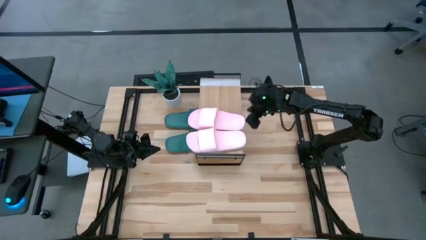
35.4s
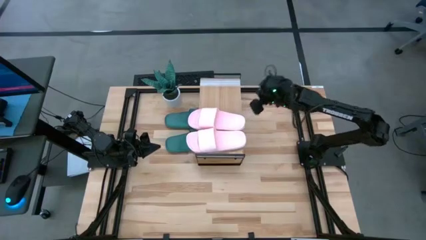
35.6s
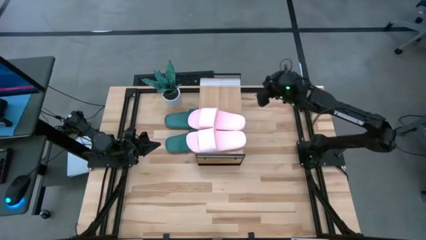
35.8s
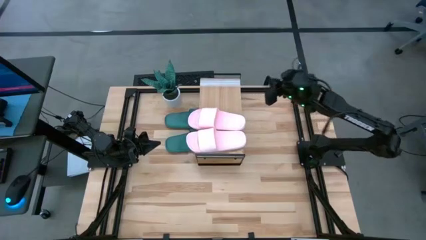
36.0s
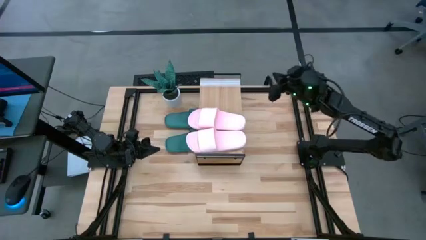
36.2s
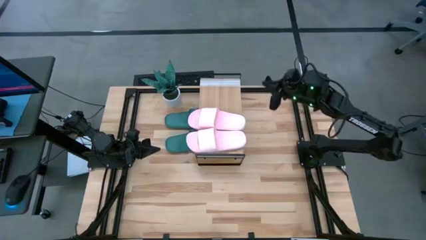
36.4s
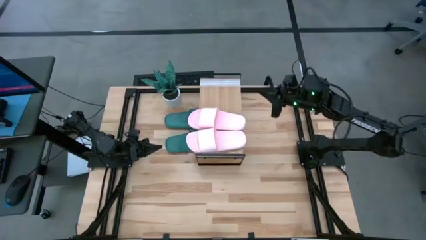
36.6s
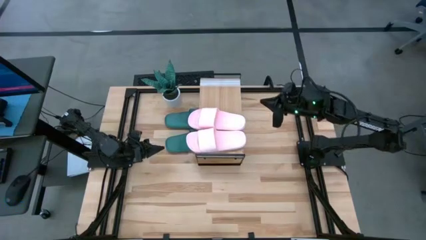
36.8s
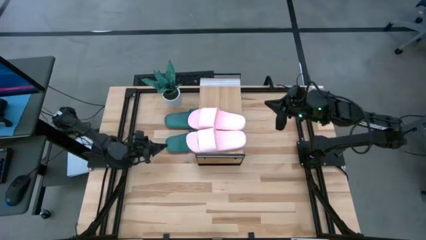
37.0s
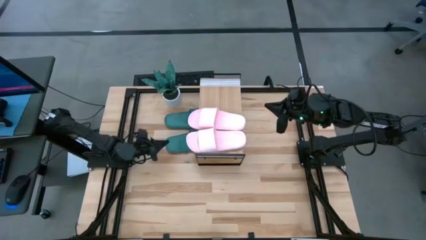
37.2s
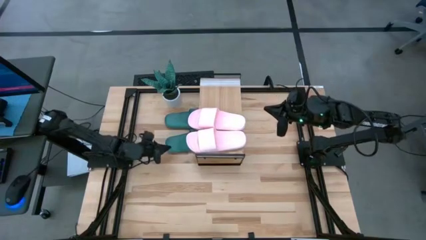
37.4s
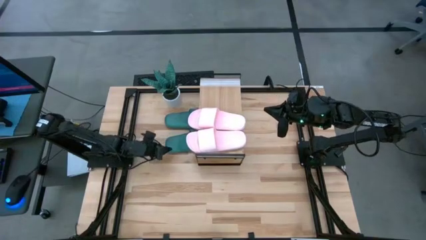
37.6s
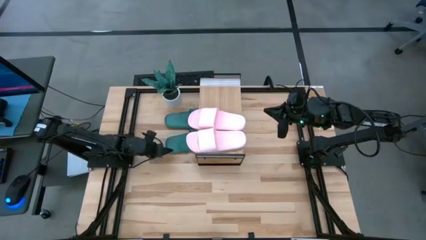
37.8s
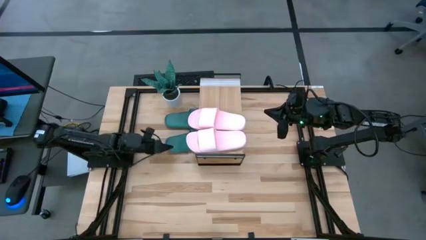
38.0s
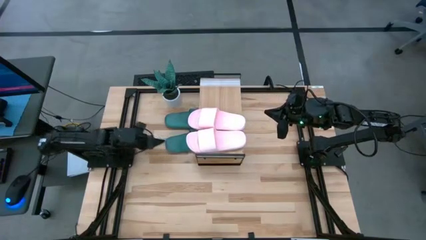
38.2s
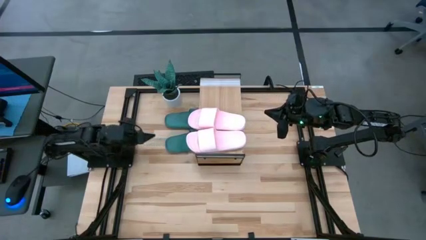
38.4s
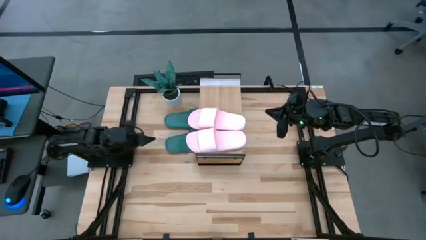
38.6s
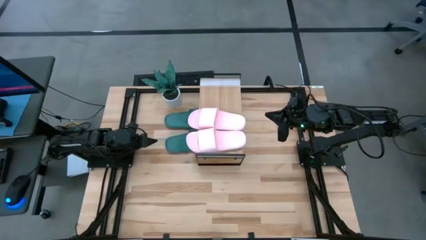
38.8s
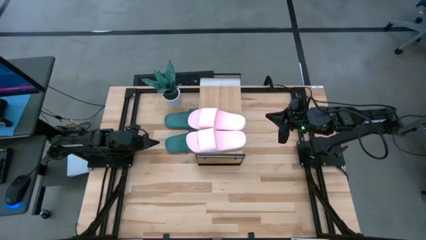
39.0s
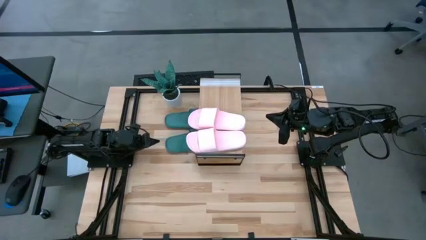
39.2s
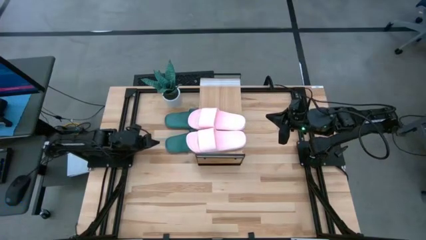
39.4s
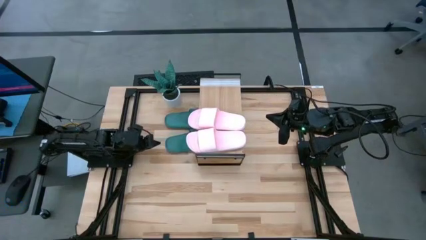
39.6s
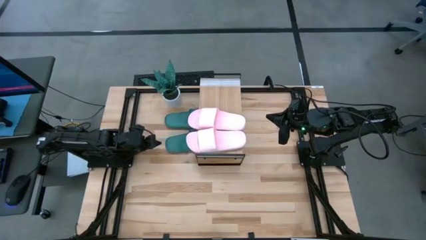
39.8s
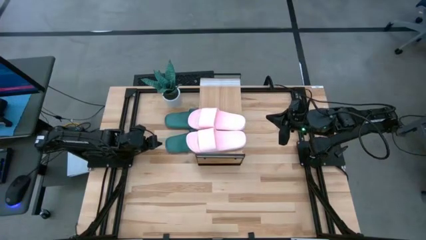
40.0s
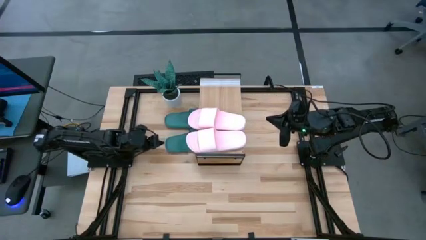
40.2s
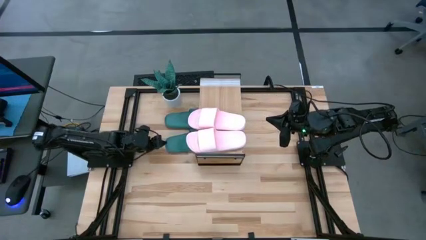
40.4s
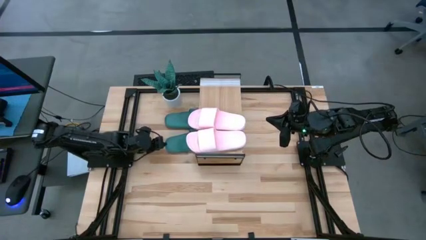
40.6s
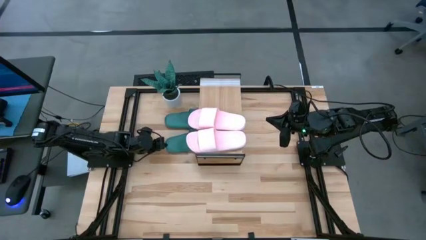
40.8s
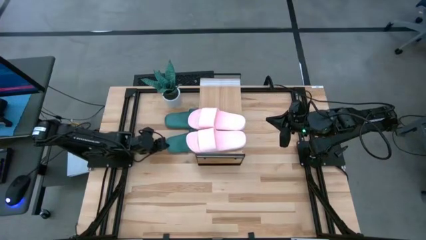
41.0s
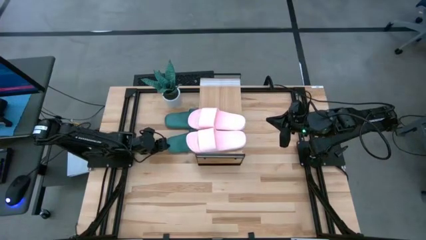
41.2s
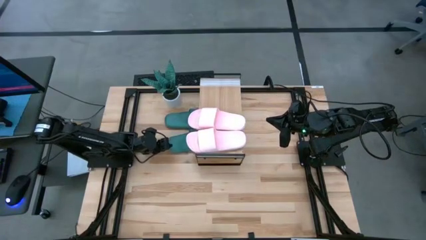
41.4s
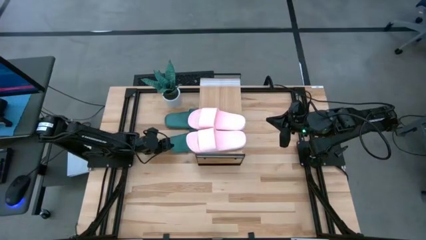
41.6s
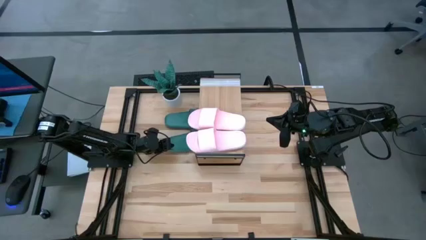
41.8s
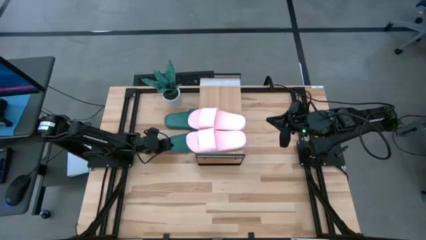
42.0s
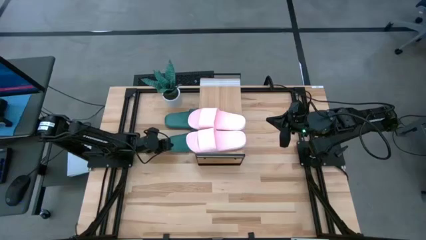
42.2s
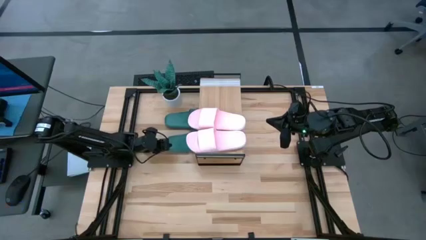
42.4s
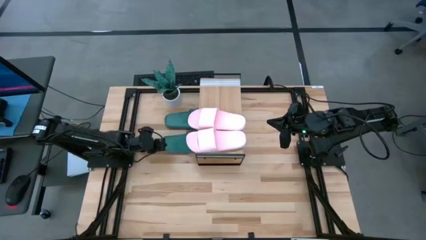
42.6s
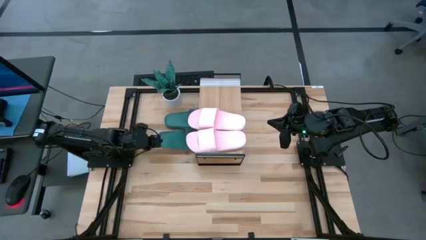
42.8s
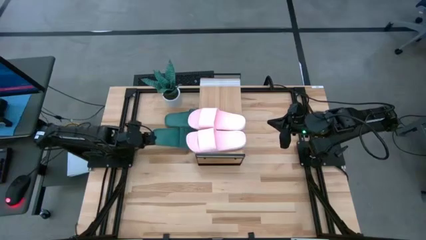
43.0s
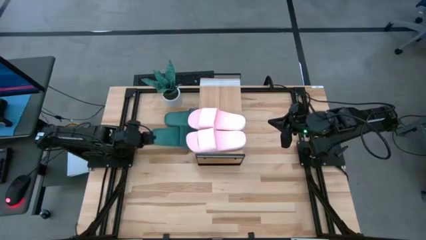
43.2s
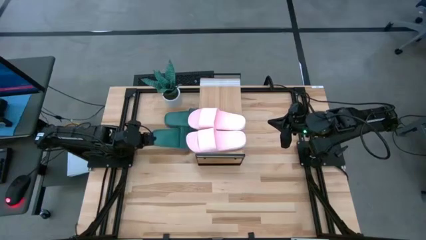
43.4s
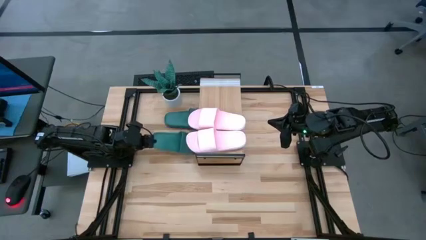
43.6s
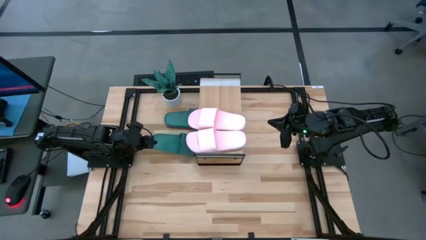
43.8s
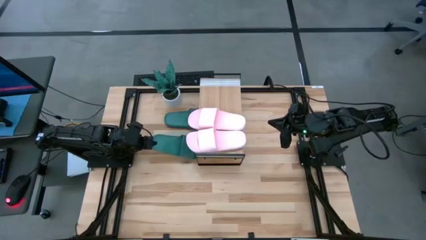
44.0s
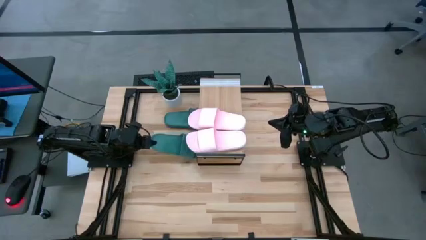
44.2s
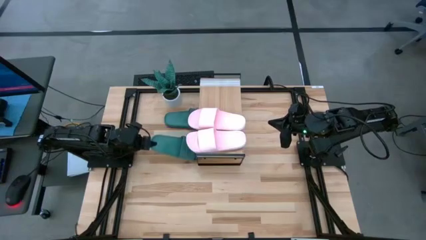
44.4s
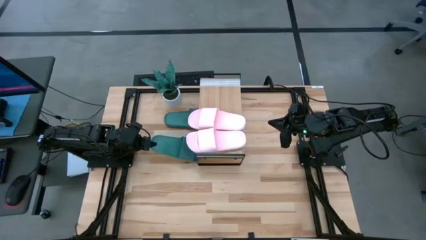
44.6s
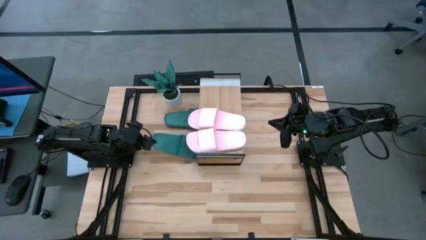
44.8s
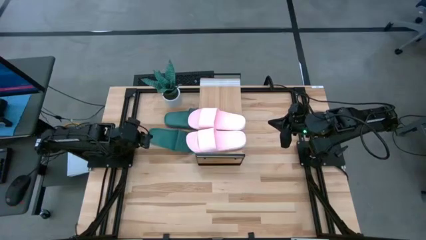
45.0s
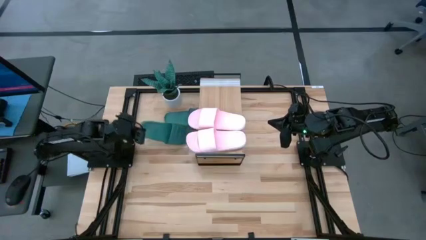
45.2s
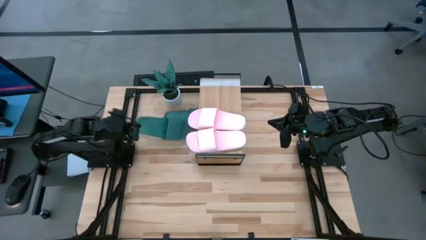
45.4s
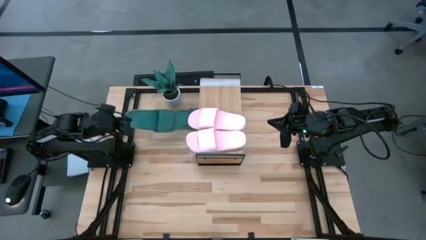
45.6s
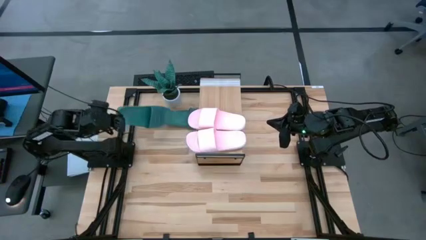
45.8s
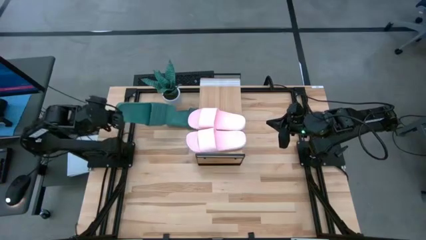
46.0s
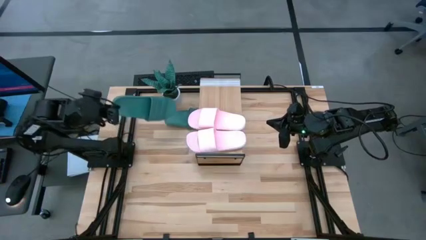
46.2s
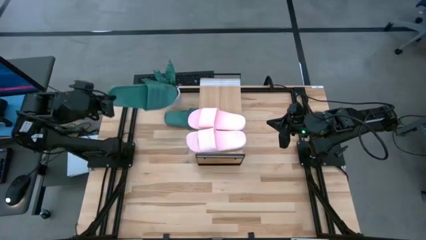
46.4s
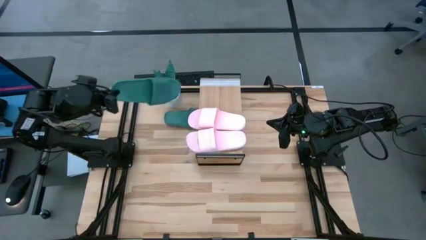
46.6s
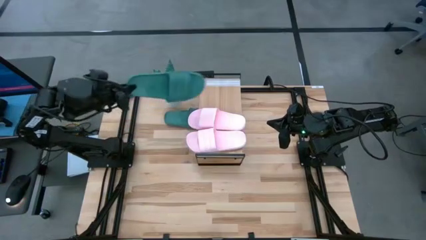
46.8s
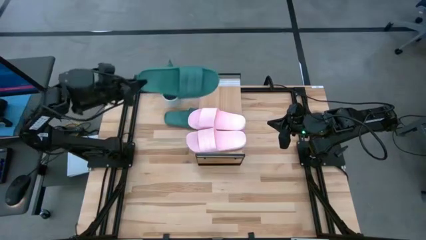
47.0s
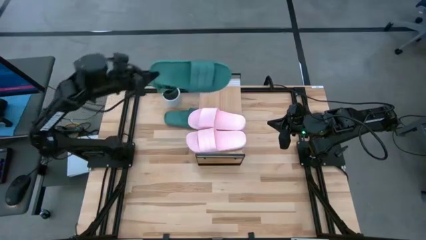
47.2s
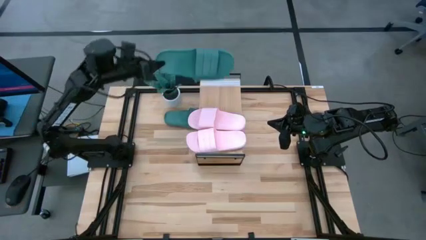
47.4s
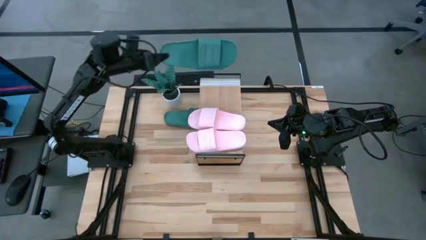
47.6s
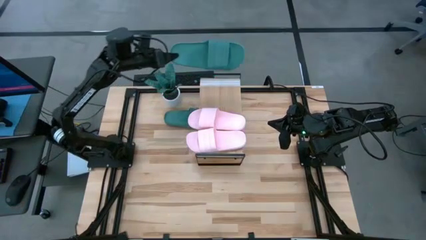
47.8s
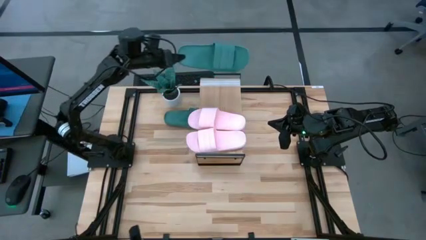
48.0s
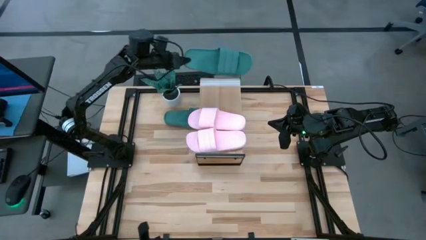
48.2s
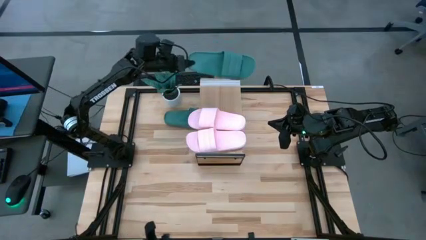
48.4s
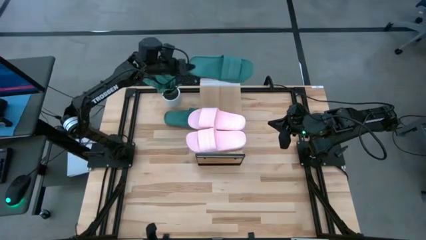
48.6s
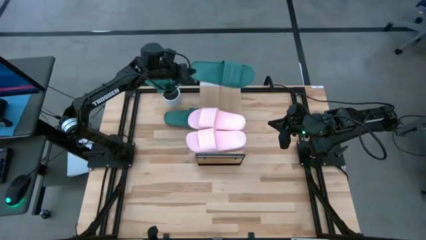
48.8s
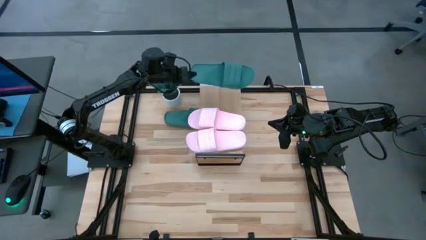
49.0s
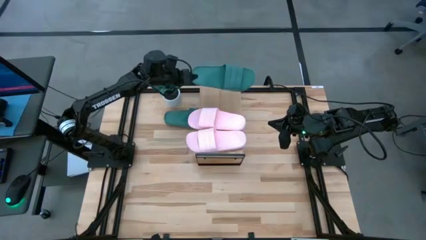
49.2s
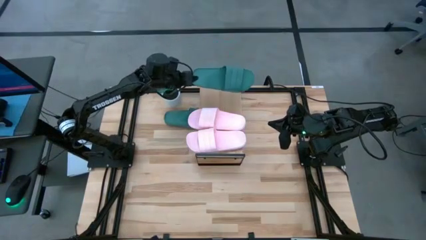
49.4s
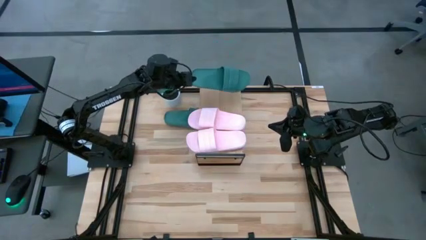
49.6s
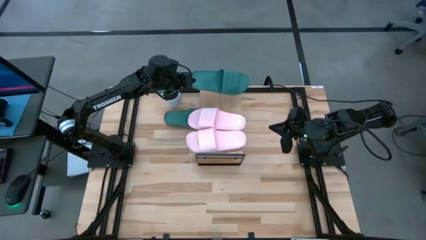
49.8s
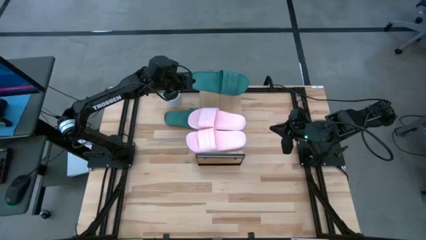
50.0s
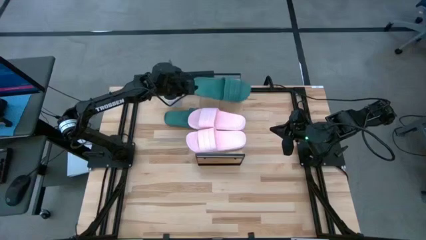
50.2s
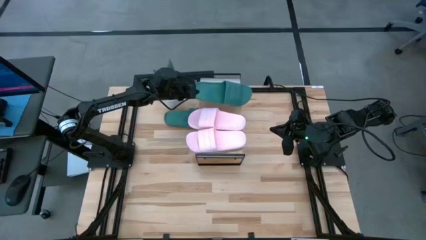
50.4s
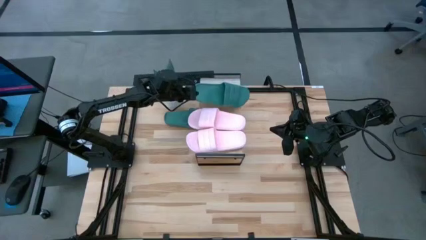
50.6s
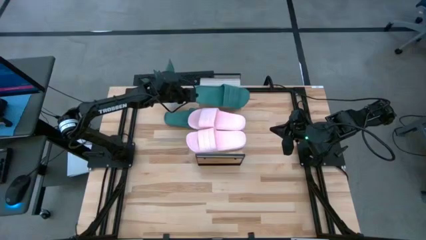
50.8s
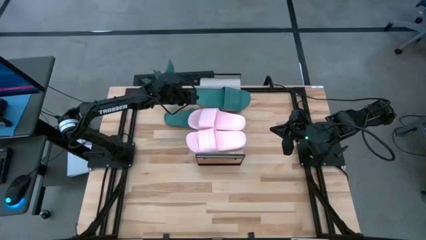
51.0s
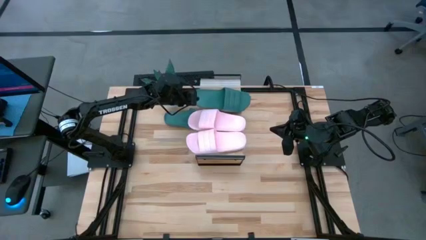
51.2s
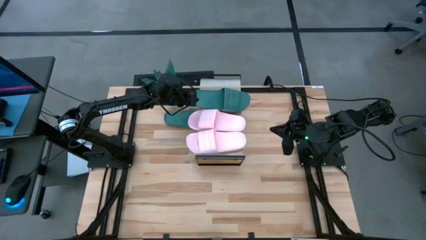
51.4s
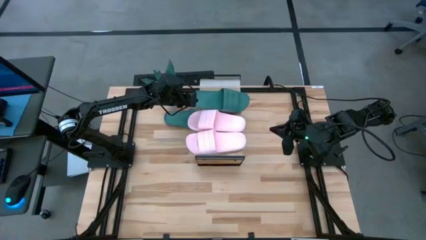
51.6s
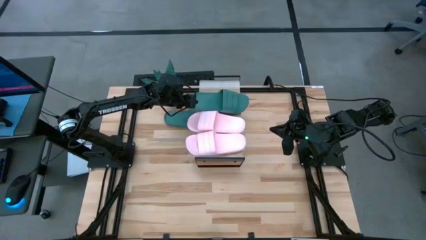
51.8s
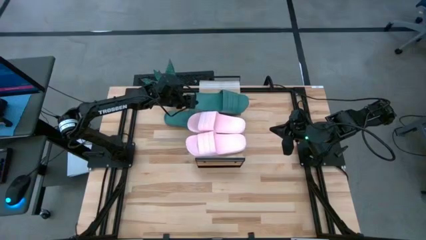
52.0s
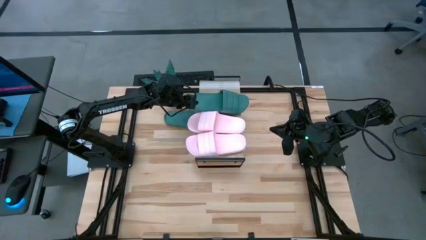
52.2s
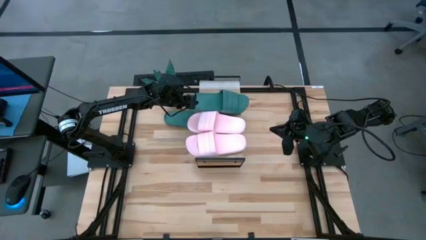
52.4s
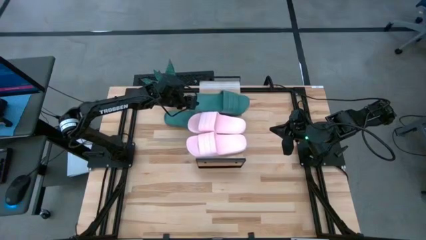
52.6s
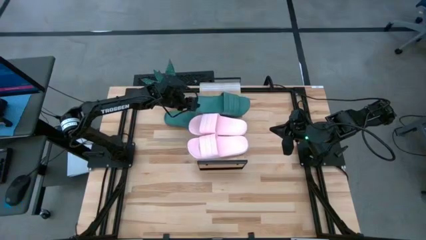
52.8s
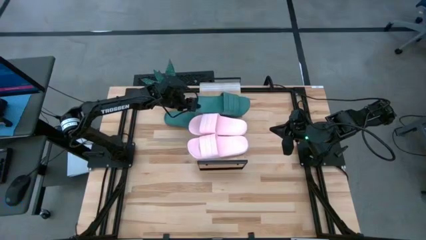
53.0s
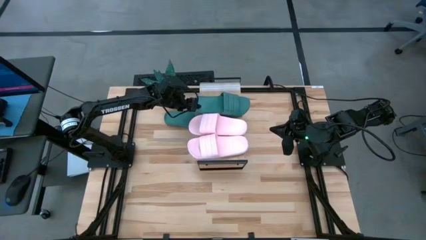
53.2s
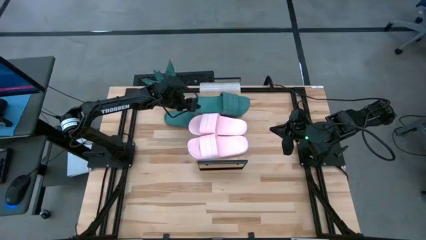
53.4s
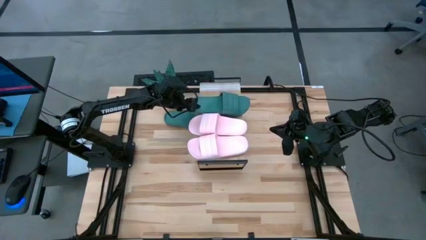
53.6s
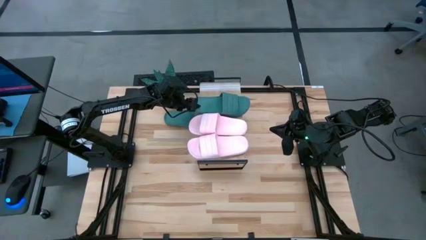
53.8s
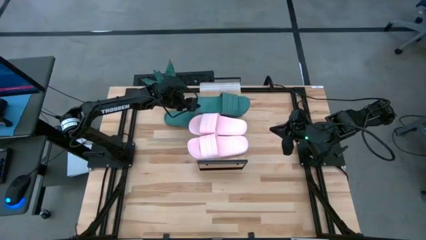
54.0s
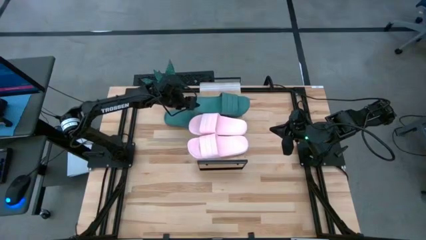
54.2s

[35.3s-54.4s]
Task: Pick and place slides into the shelf
Put the bottom green slipper on the shelf
